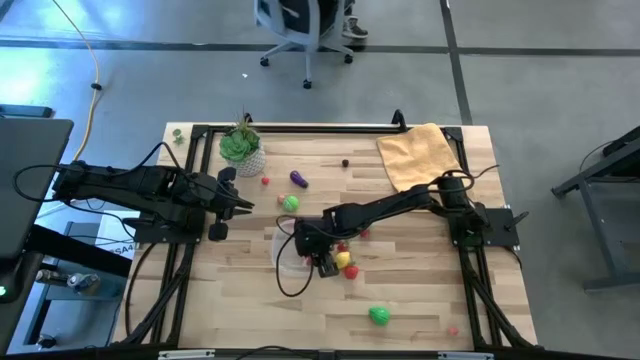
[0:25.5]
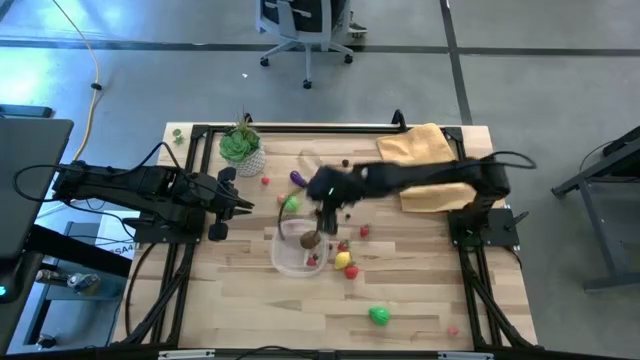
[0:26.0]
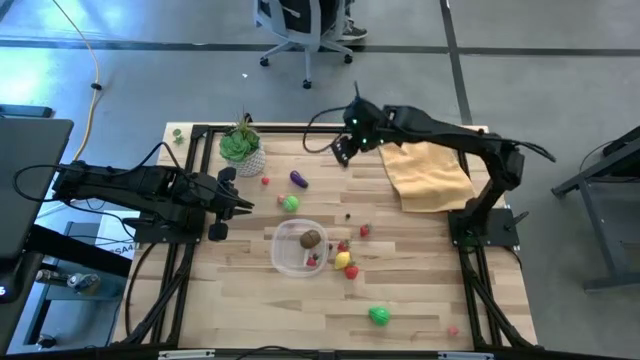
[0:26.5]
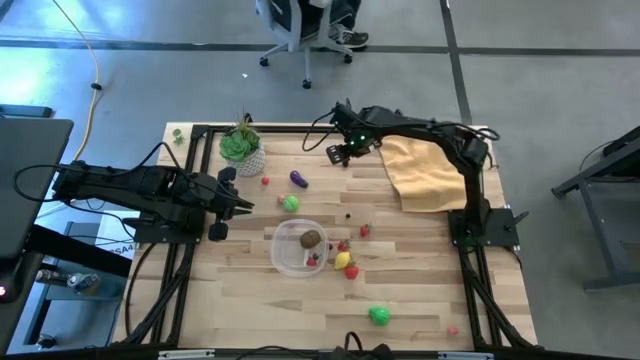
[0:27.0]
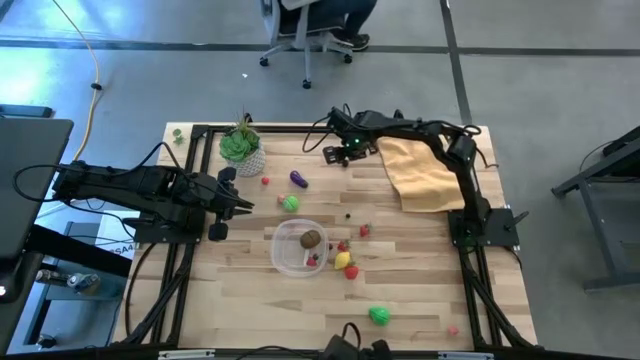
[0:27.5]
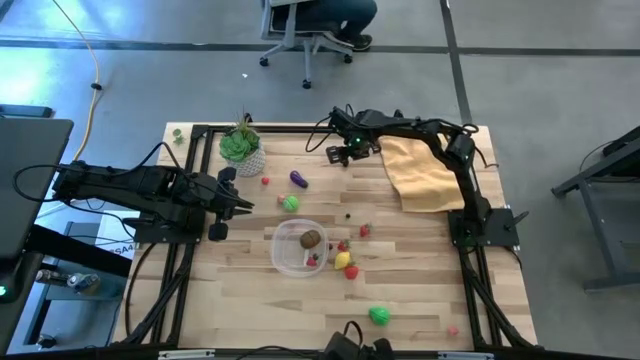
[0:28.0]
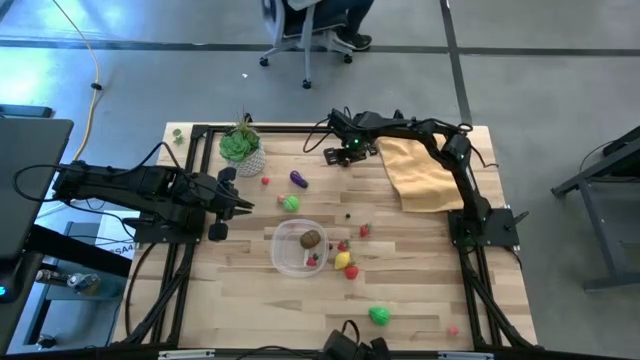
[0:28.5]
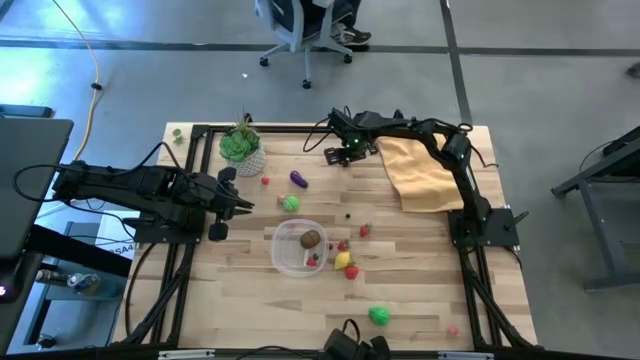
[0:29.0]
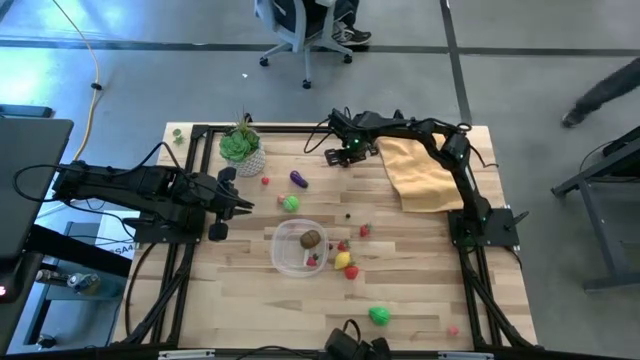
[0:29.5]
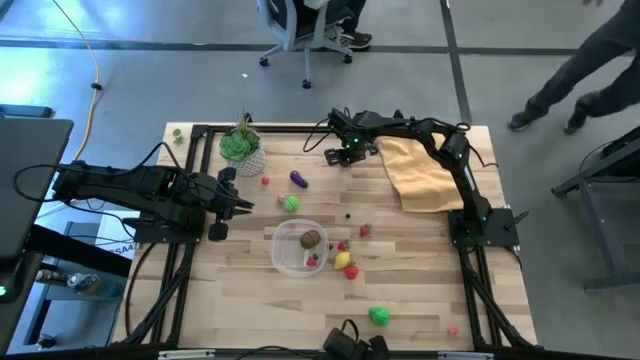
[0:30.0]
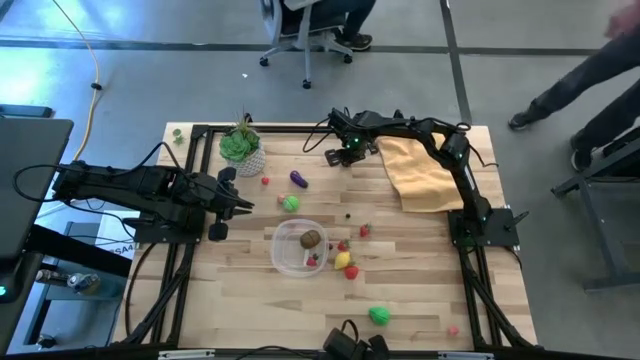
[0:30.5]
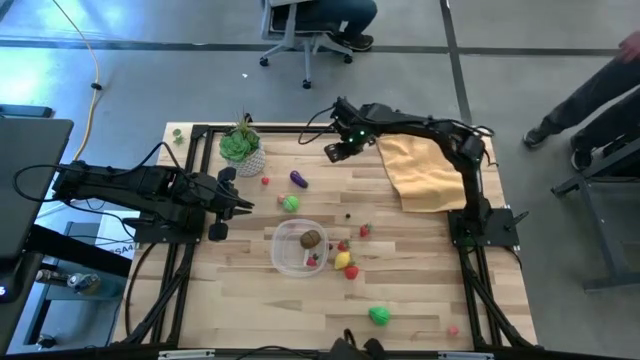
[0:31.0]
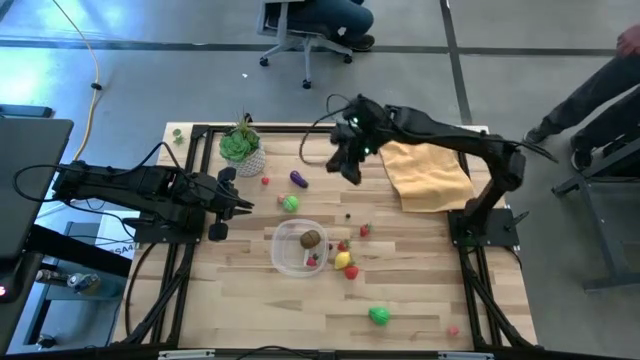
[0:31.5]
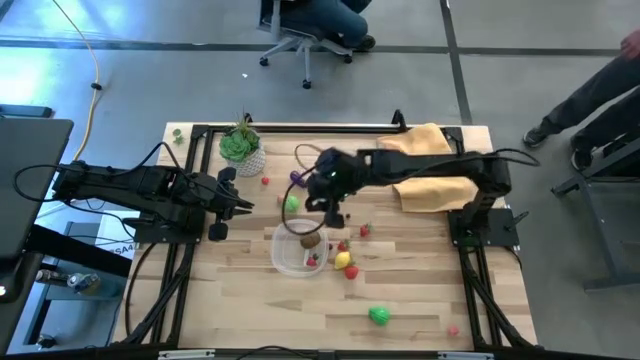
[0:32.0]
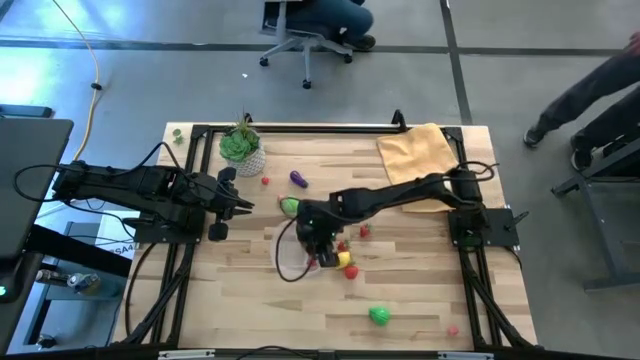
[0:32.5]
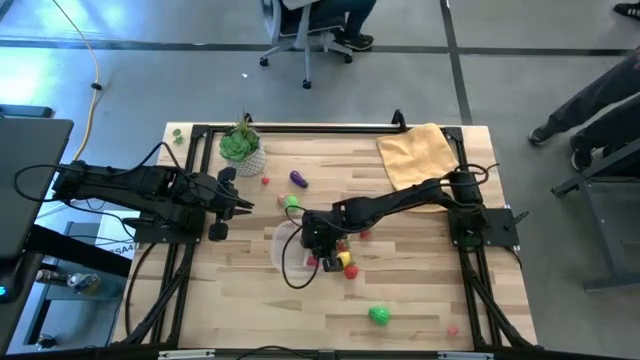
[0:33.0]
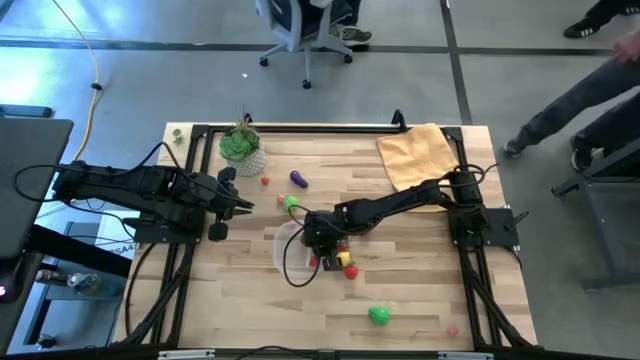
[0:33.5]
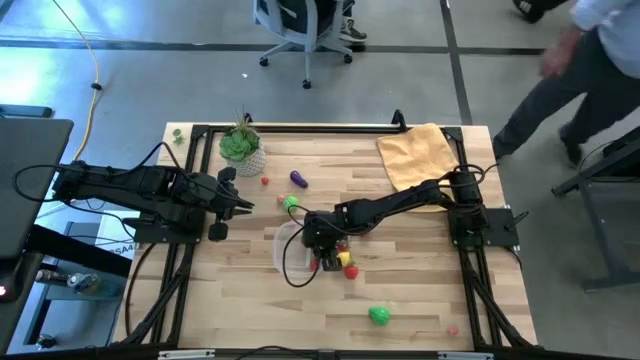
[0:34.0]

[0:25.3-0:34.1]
Task: Pick and placing Produce into tupperware
Put the blackberry into the transparent bin

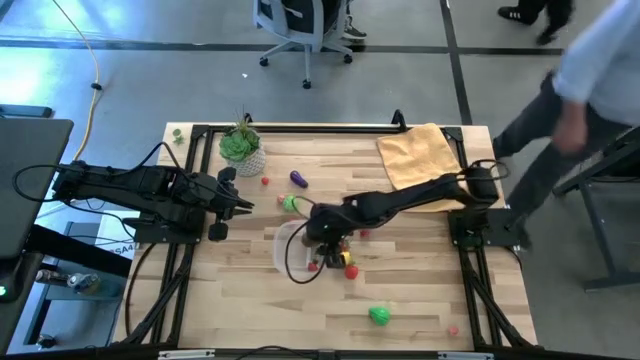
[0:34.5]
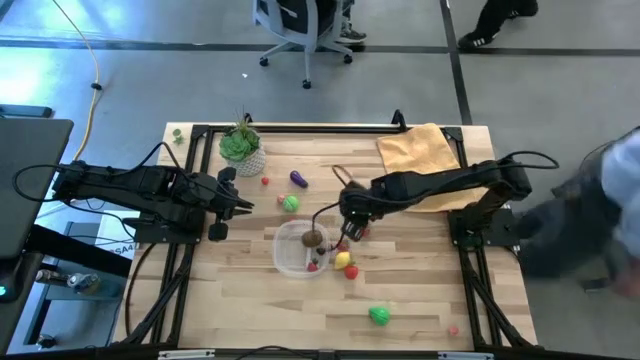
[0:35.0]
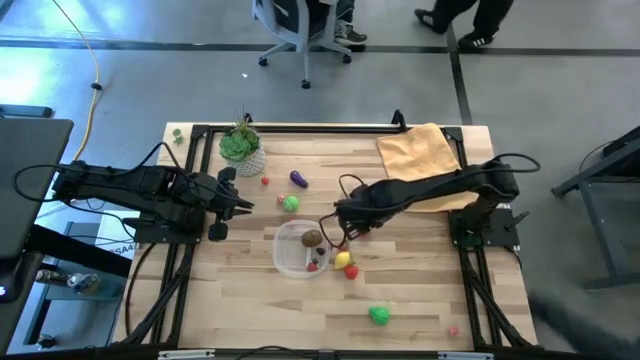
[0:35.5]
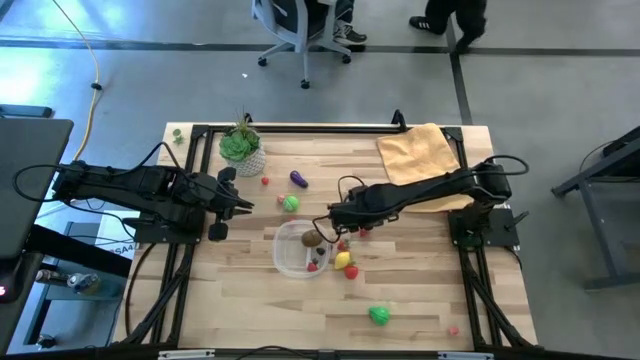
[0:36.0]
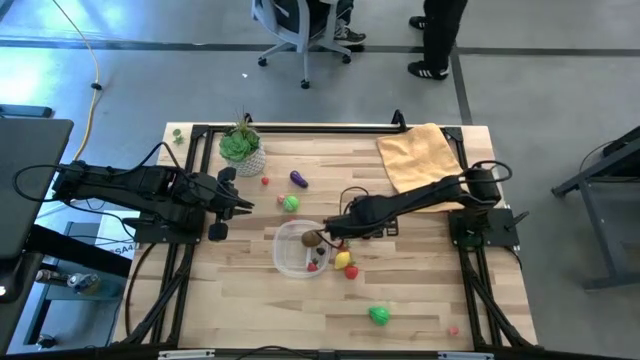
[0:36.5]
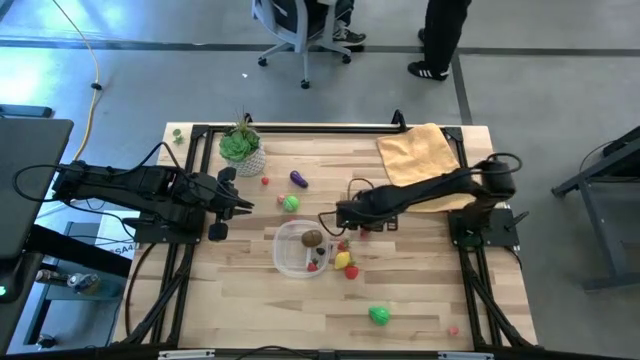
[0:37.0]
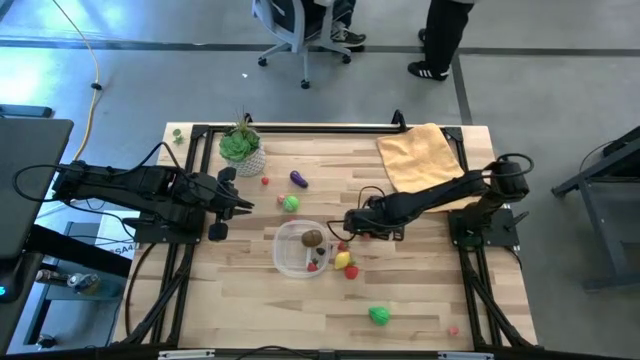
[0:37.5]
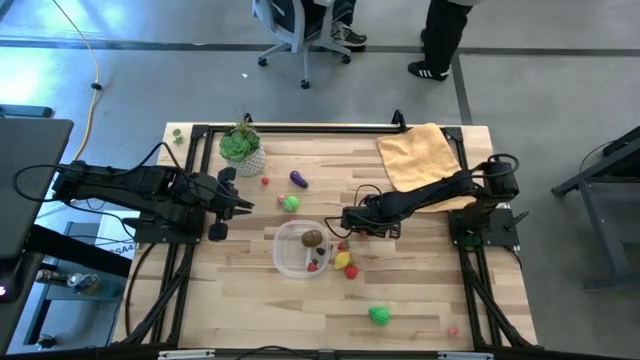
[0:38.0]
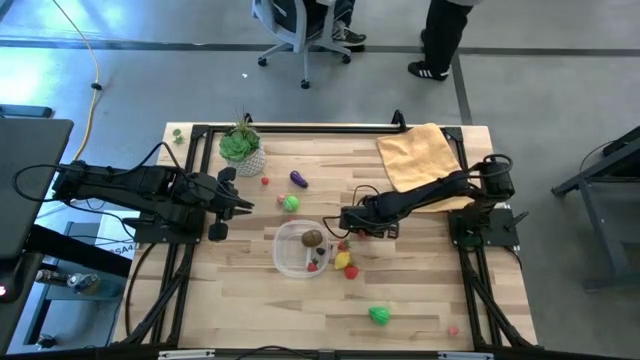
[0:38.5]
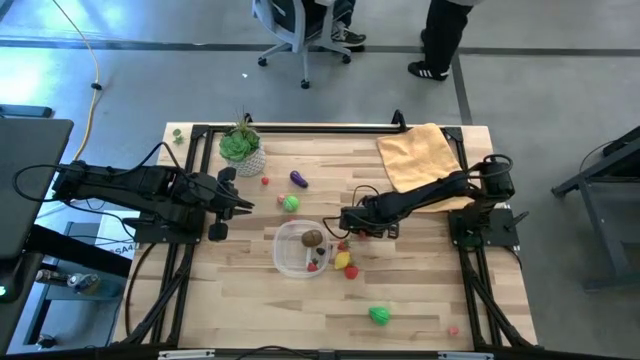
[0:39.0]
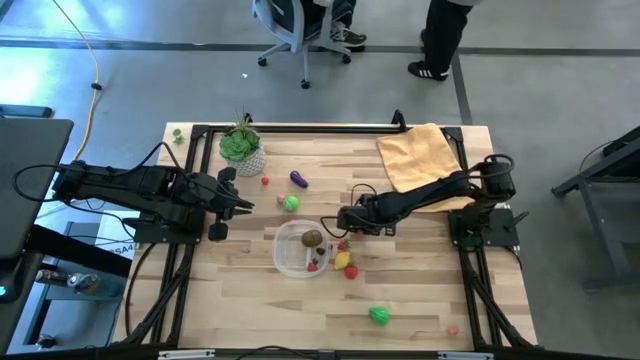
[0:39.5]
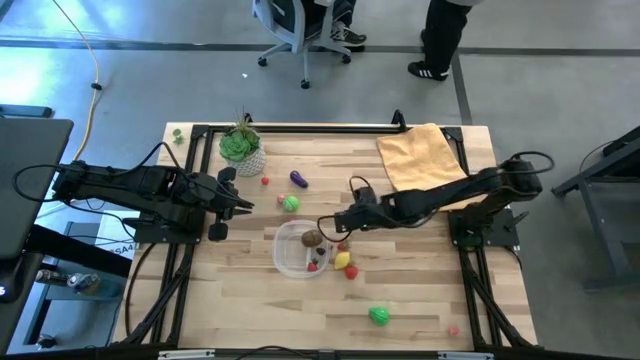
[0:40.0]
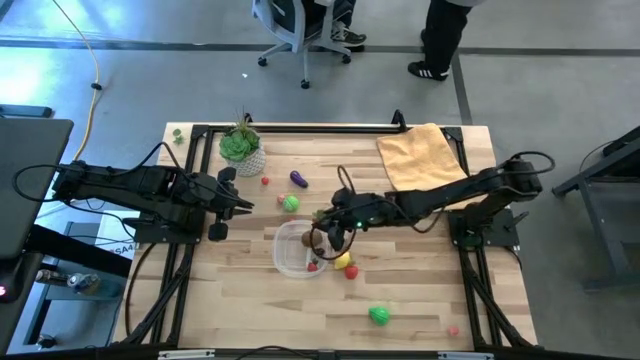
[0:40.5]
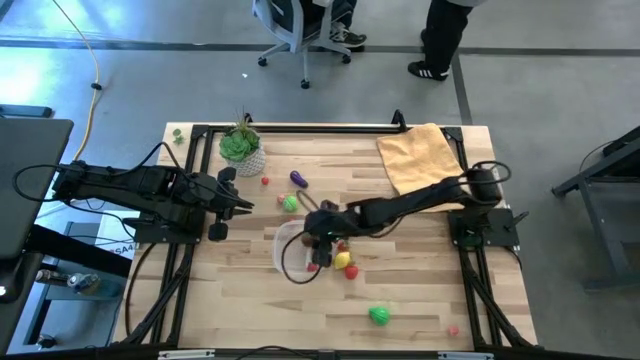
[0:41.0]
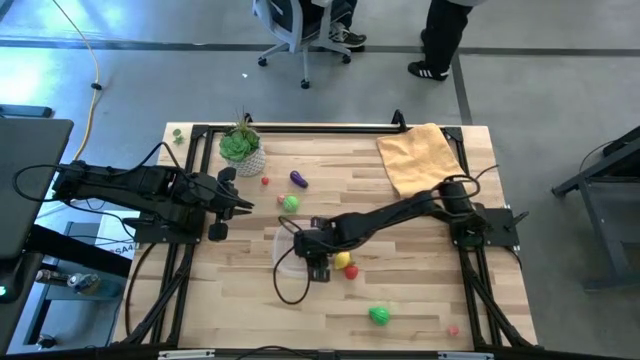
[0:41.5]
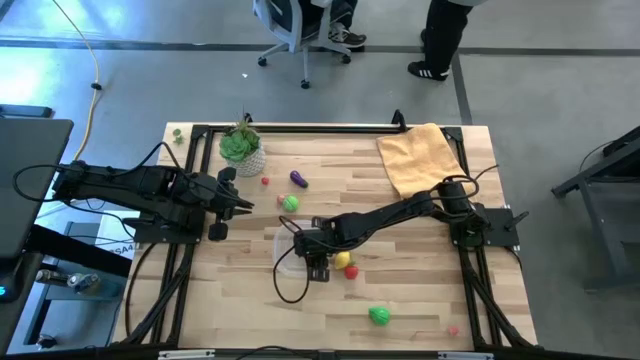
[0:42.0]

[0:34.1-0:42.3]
Put the red strawberry into the transparent bin

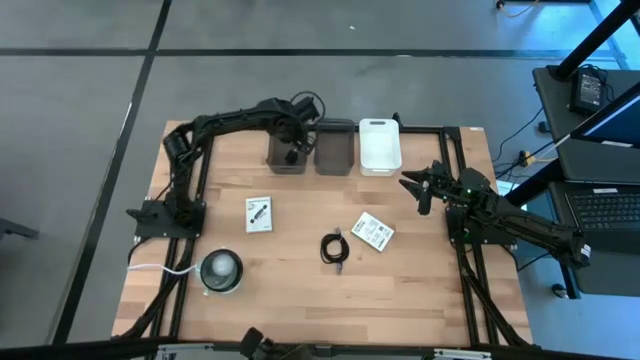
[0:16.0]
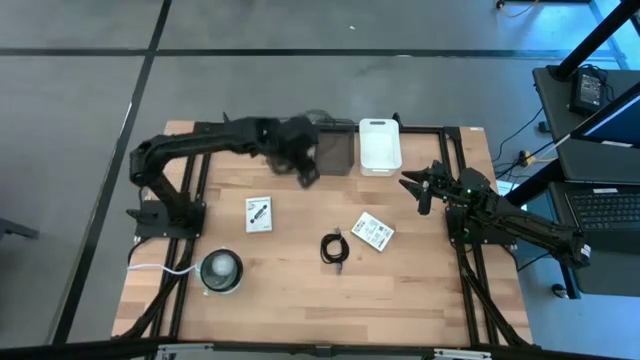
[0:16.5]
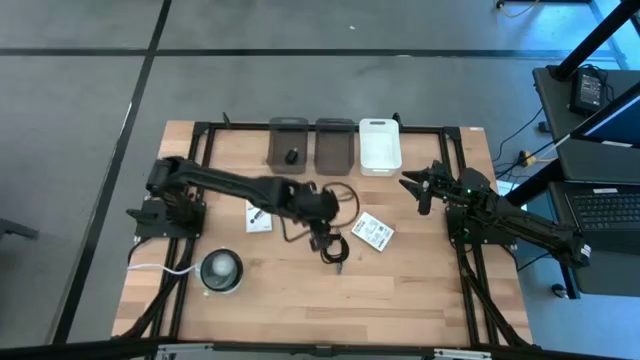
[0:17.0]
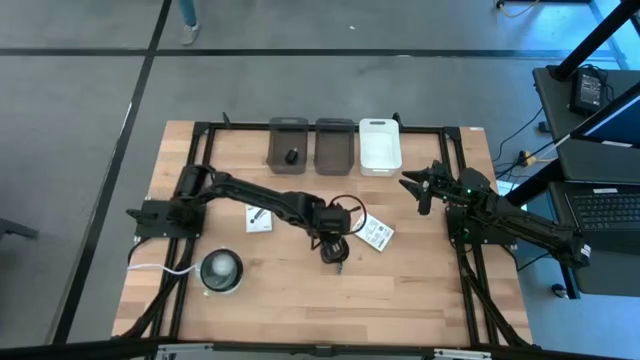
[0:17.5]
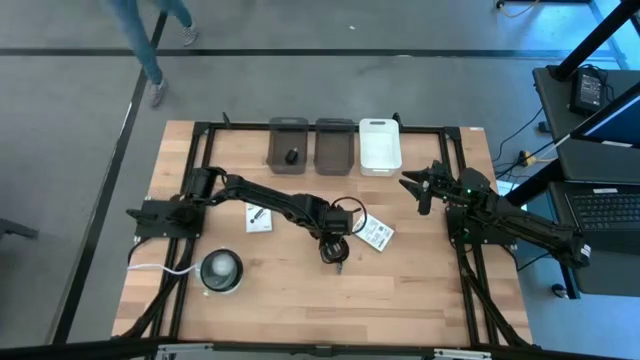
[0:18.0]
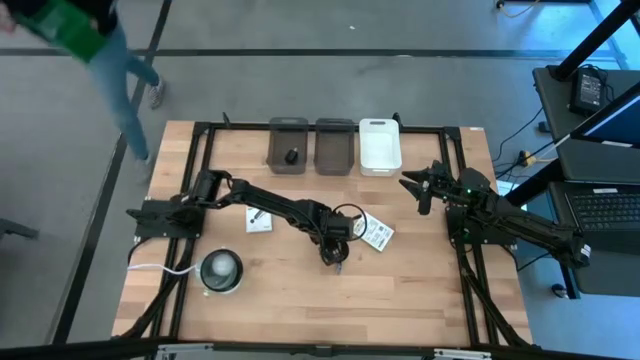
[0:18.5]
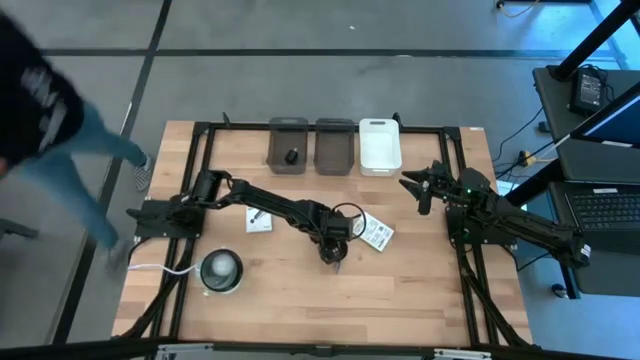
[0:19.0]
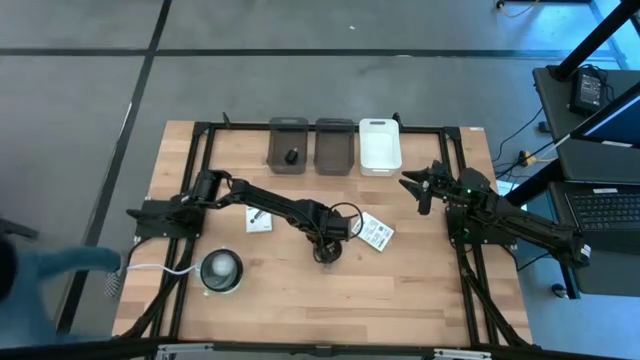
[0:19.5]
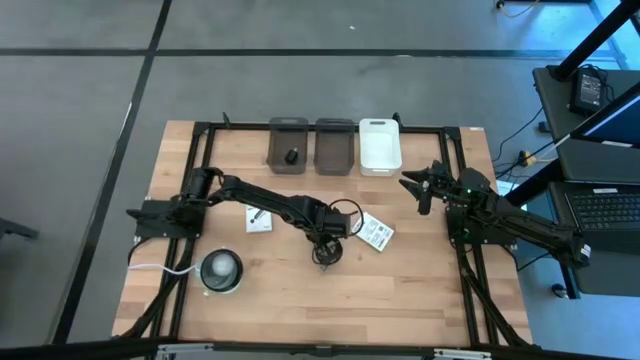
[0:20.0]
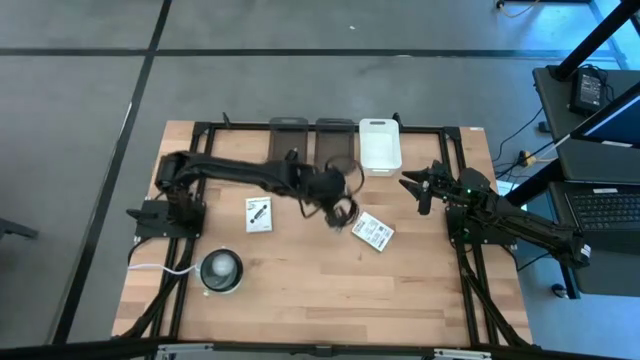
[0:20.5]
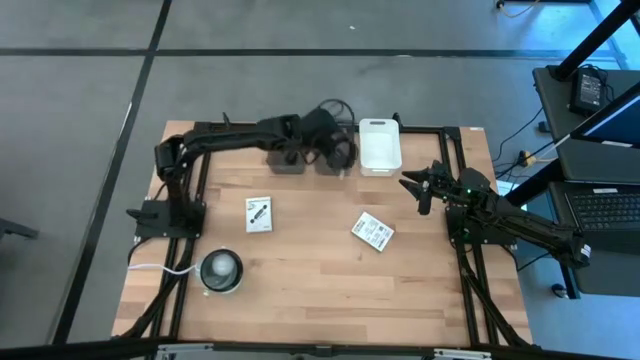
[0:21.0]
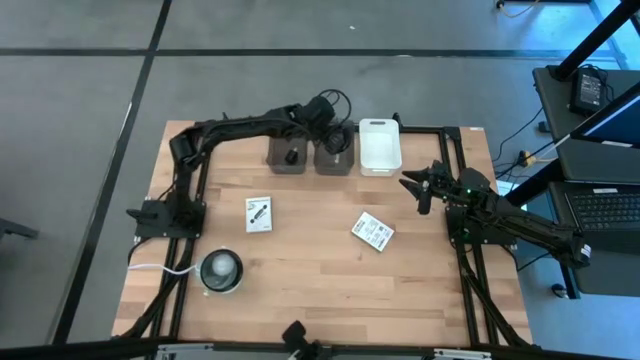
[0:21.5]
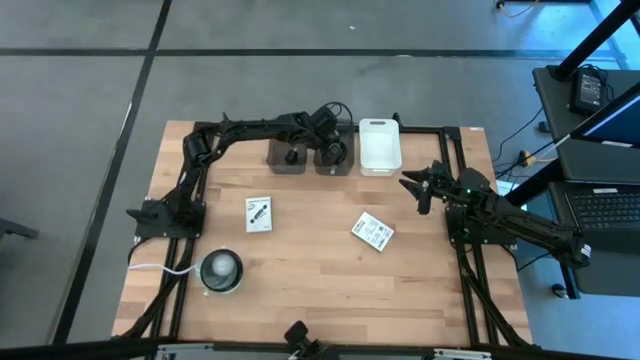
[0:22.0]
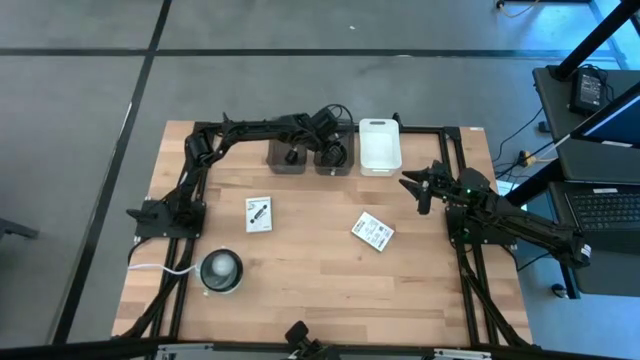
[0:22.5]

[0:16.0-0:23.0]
Task: Pick and place items into bin
Put the black charger cable into the right gray bin
